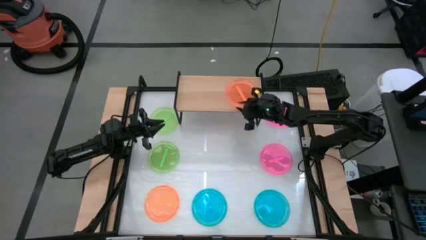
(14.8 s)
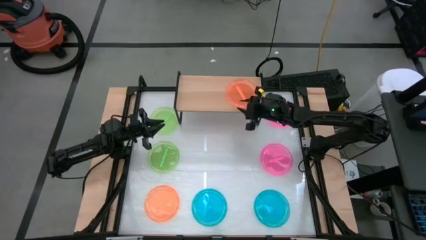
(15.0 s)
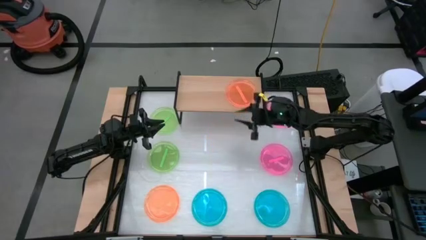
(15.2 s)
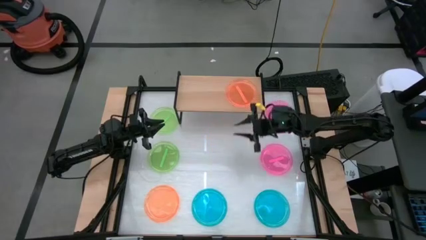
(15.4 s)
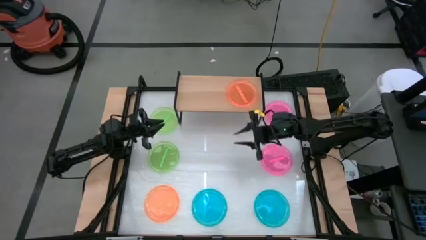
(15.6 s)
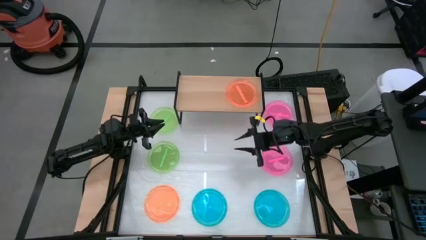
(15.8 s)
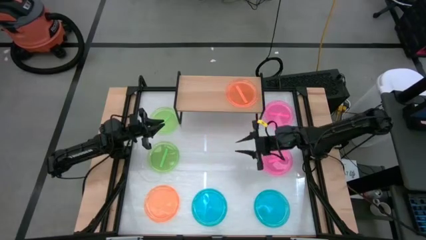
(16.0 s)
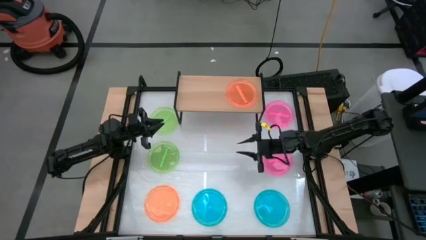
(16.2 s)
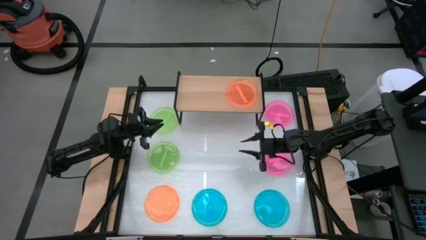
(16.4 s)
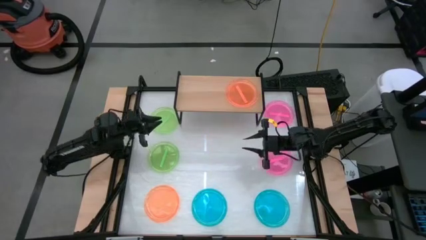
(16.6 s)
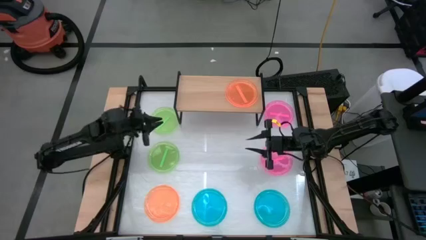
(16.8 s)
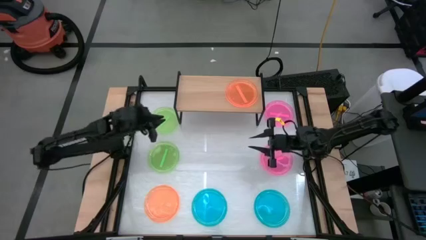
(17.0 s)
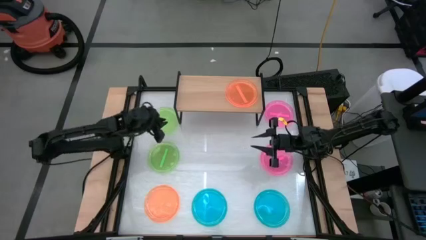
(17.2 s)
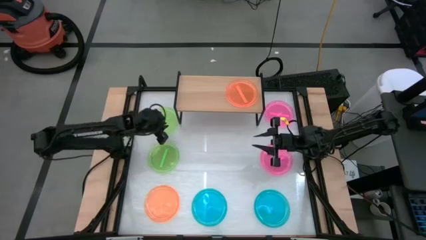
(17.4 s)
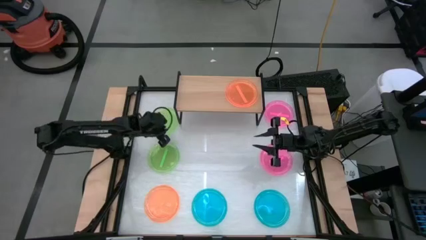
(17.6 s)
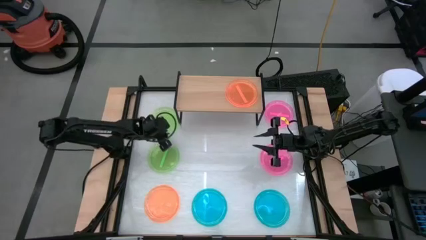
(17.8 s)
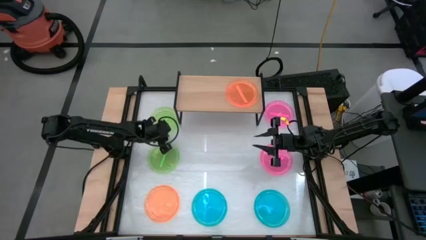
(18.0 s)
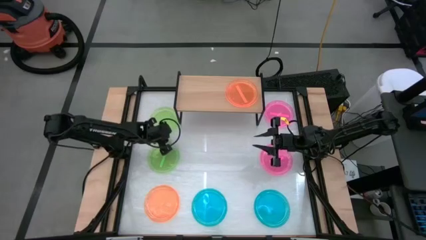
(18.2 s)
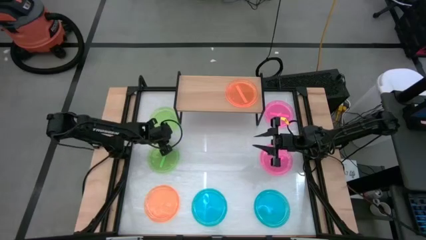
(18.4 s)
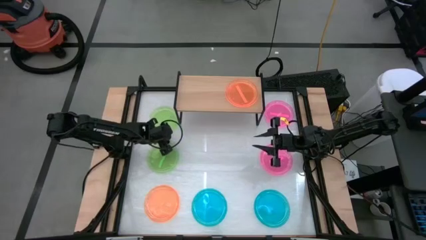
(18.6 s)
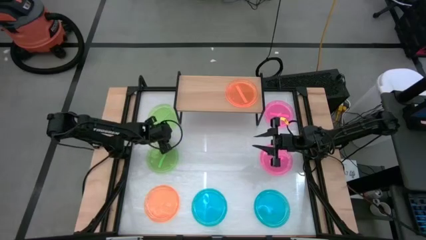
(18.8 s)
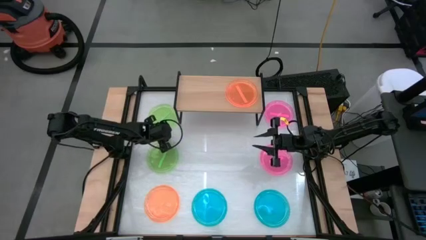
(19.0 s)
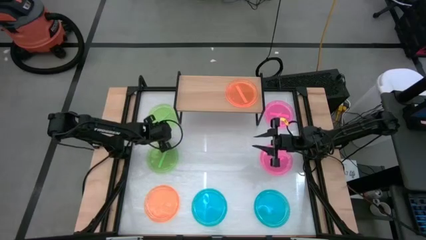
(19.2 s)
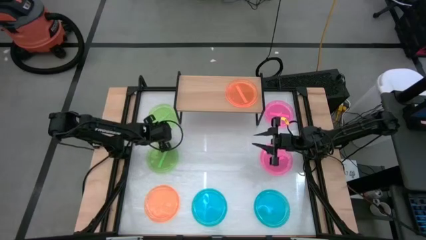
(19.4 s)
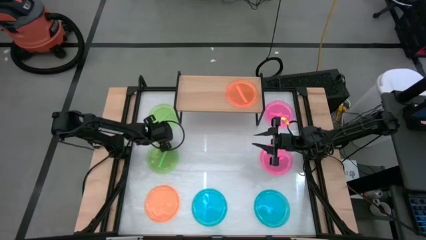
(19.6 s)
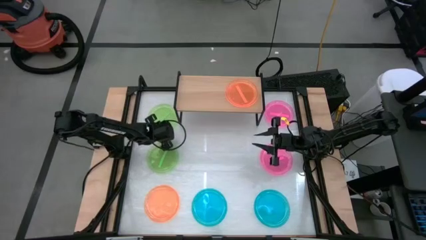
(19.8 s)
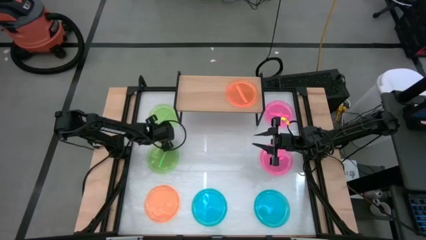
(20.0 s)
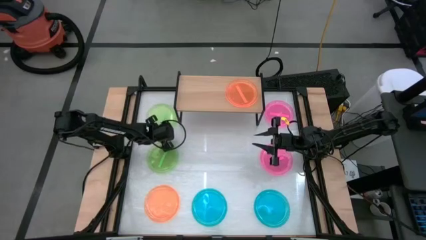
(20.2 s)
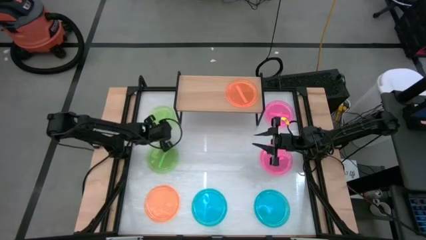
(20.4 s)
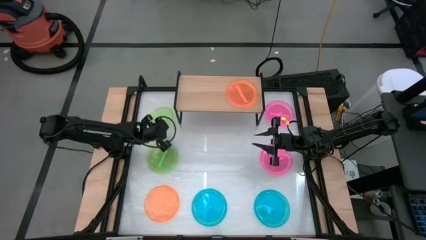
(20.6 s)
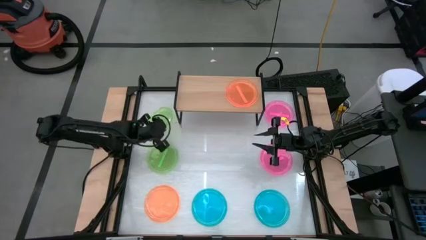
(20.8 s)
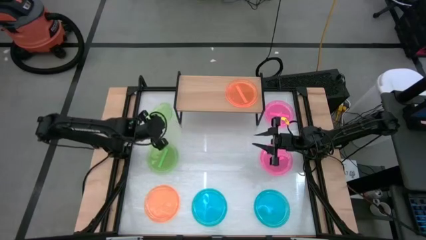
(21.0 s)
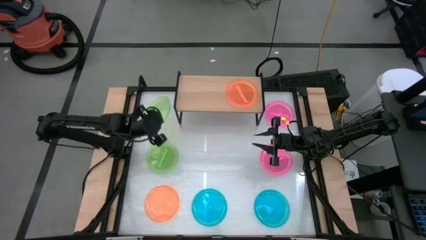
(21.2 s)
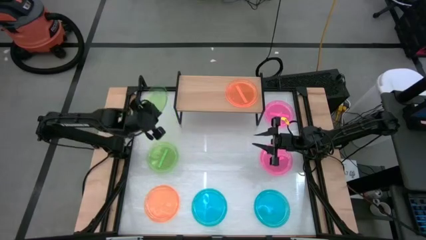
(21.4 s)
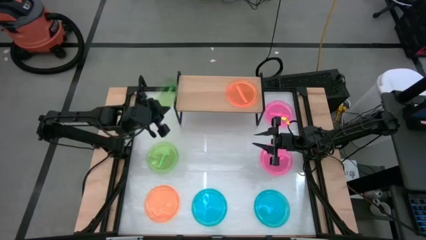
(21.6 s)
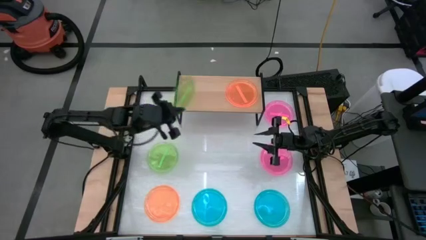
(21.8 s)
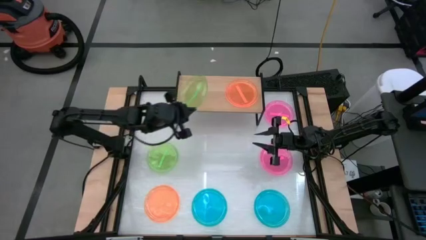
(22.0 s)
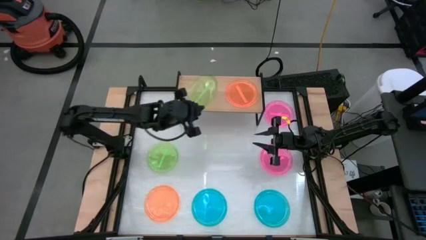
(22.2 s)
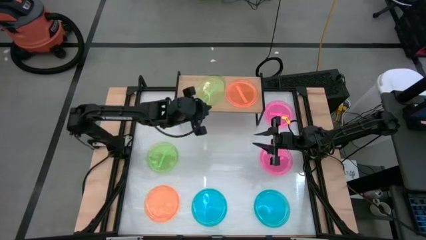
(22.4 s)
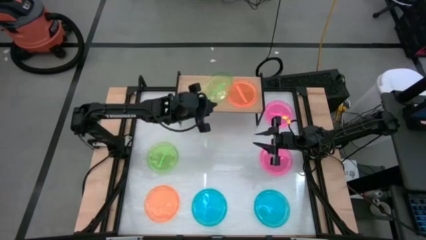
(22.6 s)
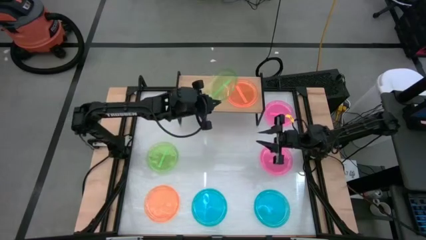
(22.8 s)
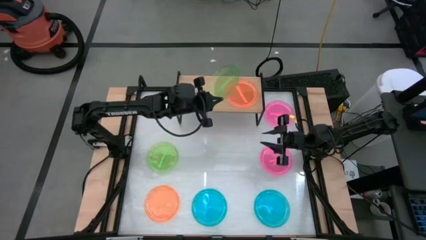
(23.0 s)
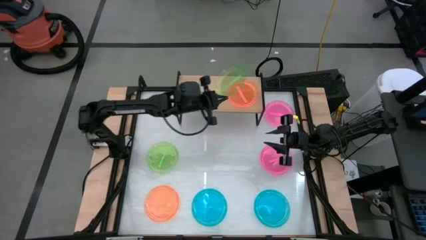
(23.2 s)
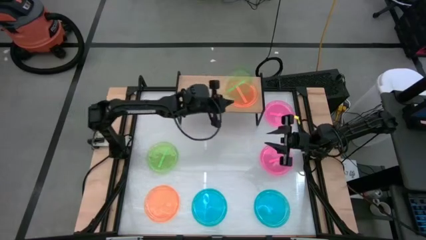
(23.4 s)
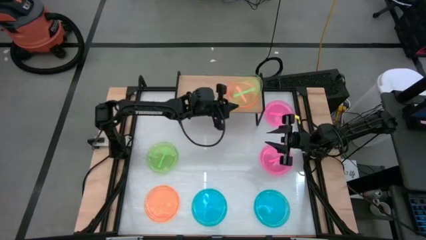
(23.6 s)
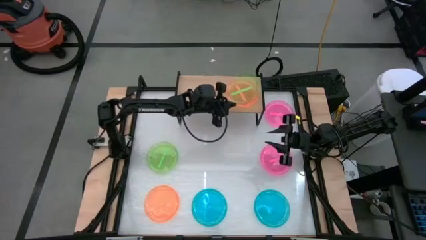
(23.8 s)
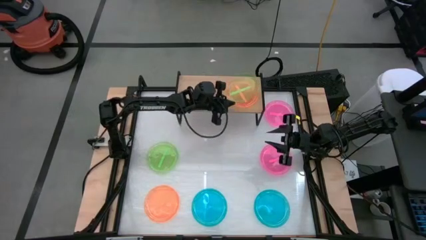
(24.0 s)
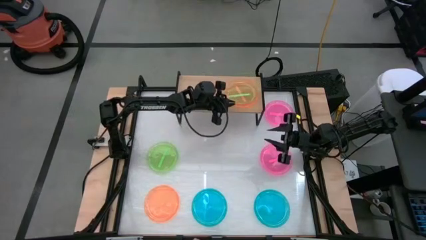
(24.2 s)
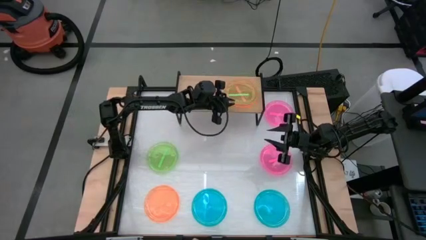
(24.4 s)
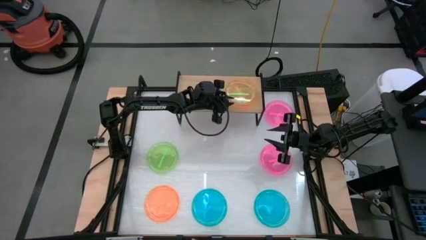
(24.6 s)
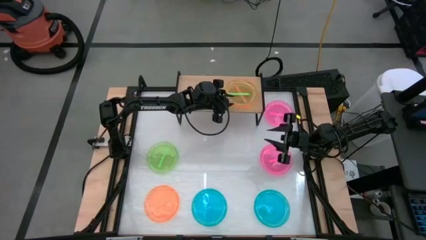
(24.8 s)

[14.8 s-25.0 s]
Task: Place and stack plates onto a shelf
Stack the top green plate on top of the orange plate on the shelf

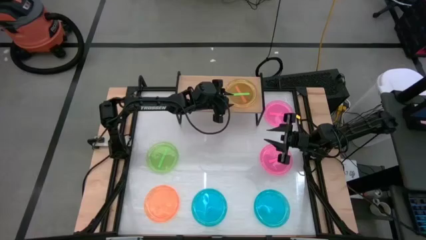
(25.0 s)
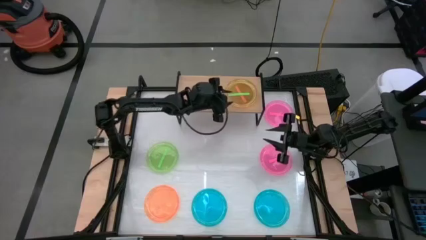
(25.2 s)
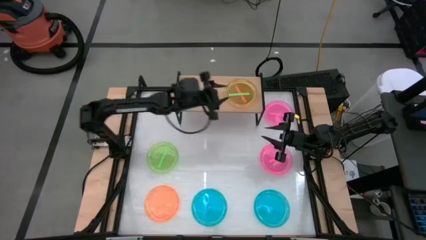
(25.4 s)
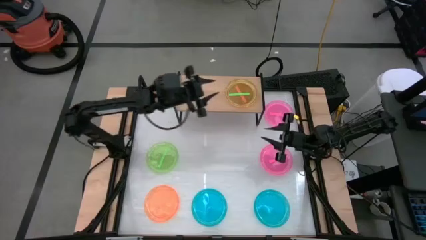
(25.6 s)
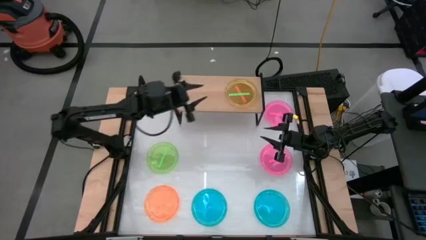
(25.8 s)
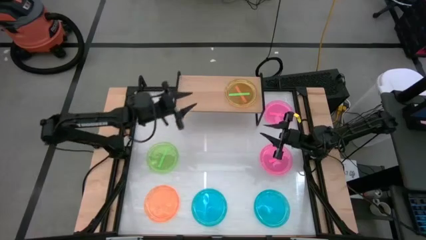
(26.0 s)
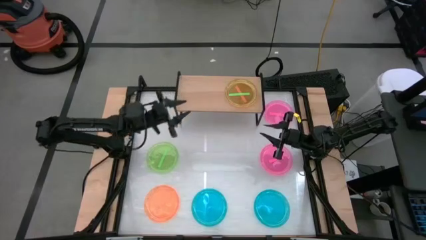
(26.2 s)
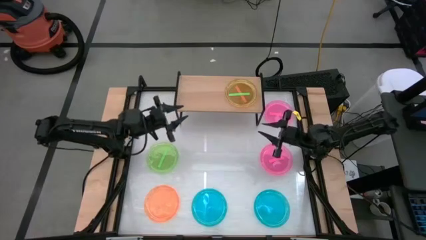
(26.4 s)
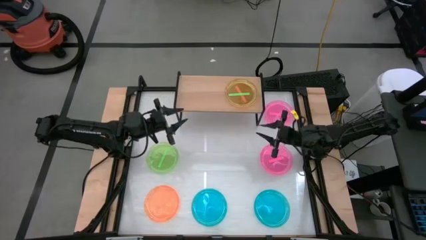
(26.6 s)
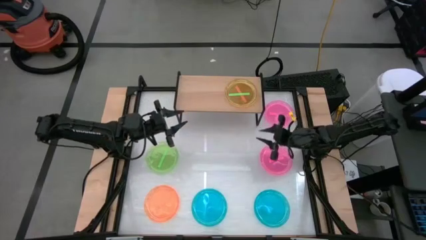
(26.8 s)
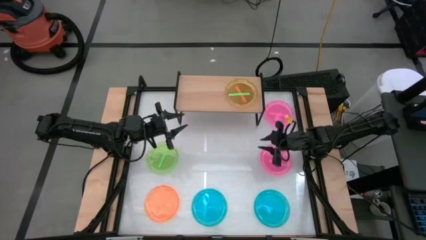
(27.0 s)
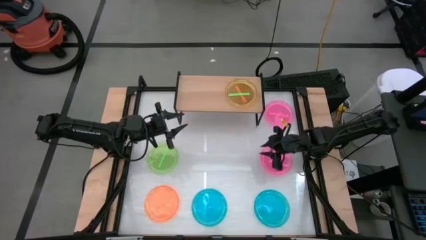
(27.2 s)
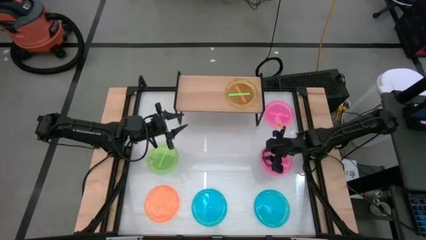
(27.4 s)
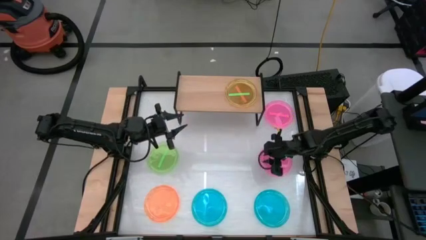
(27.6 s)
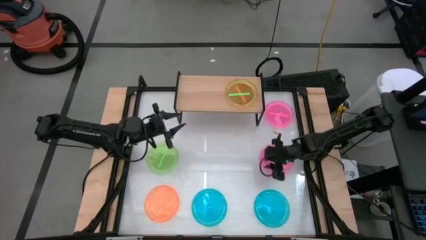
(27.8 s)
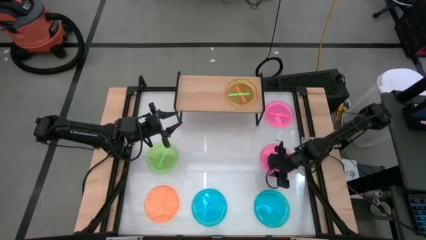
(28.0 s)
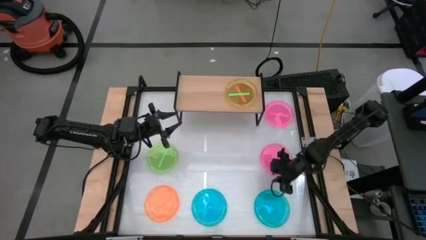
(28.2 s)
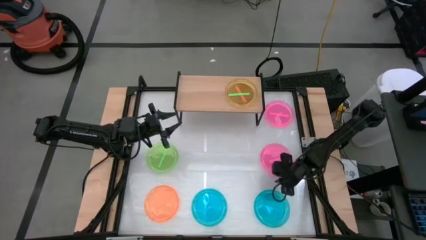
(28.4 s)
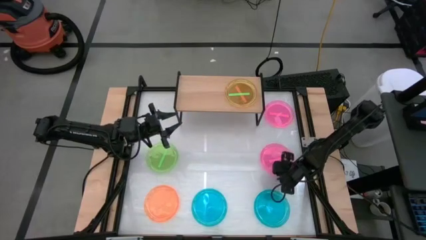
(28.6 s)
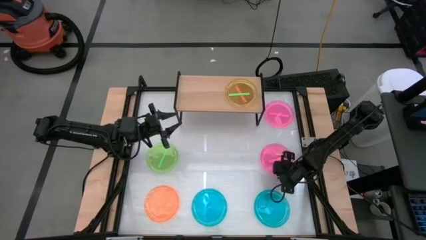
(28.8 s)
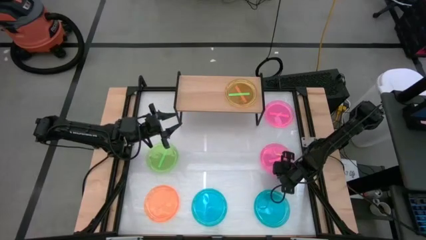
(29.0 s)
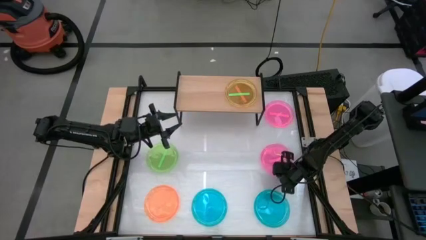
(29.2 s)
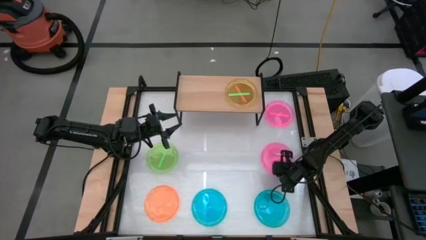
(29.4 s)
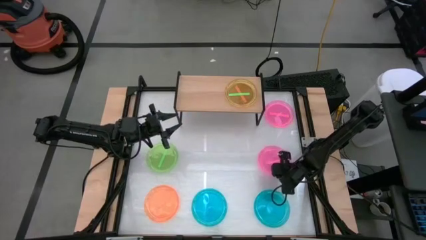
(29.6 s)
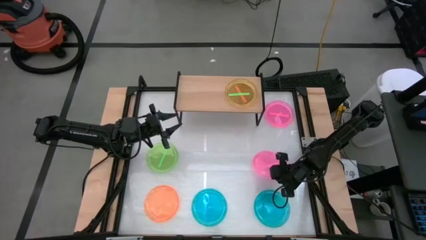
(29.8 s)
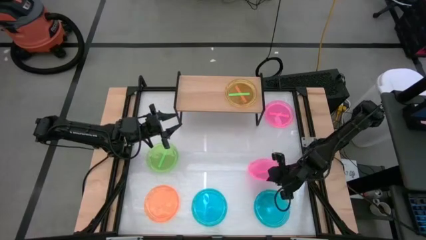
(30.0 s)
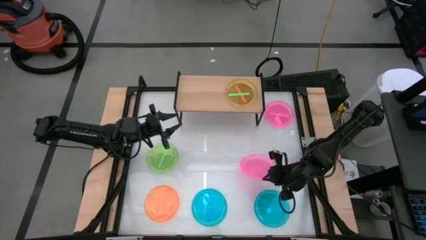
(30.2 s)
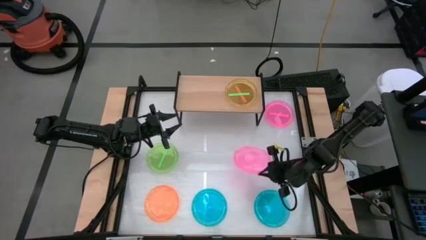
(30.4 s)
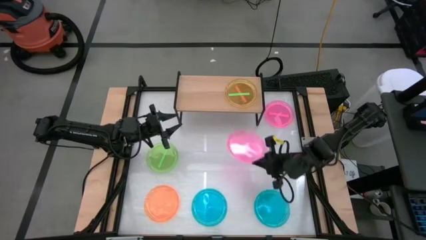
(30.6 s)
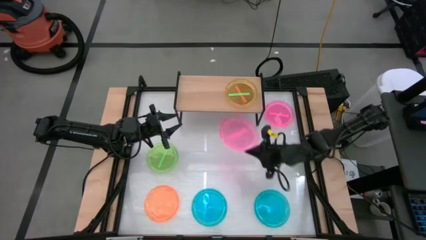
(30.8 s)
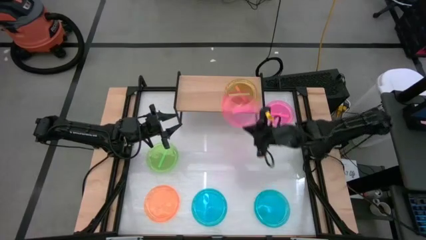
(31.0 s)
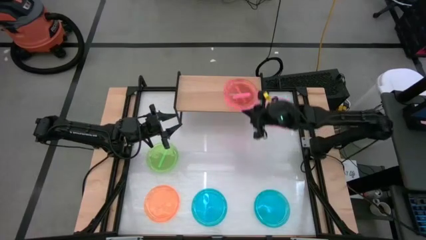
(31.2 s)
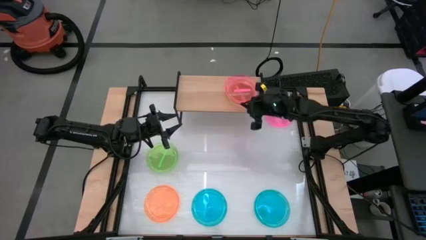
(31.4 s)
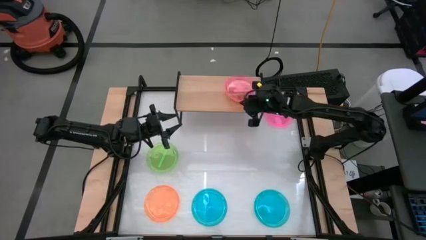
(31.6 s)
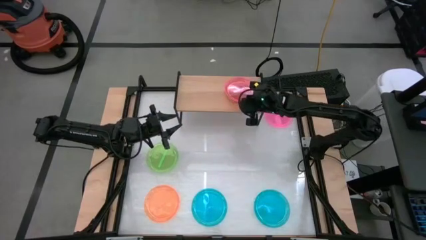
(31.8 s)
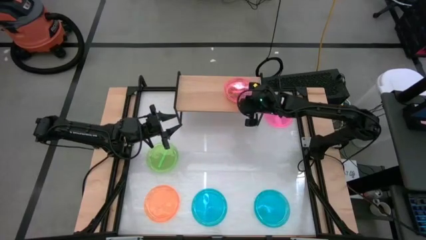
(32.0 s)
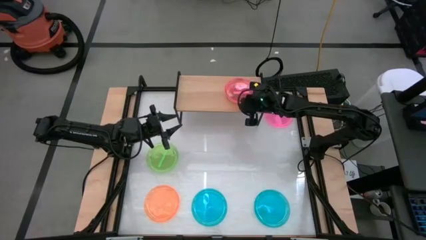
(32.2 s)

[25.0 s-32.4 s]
Stack the bottom pink plate on top of the green plate on the shelf
